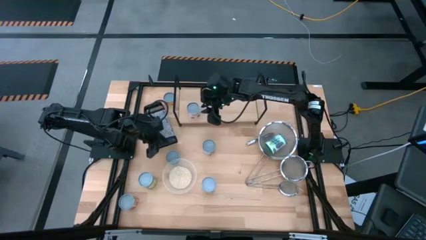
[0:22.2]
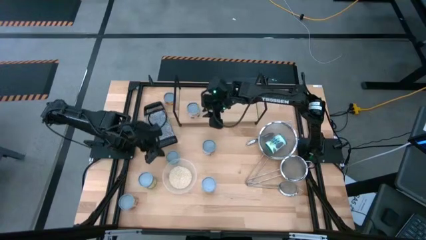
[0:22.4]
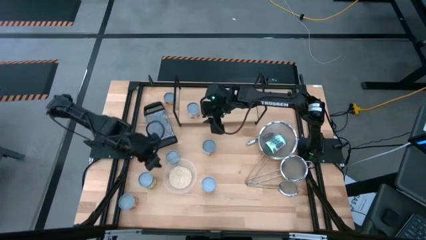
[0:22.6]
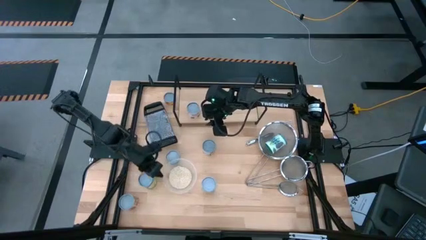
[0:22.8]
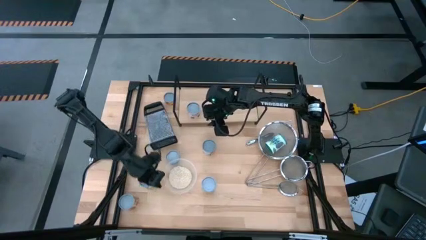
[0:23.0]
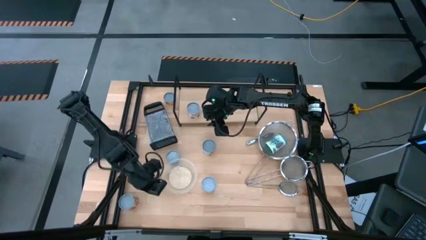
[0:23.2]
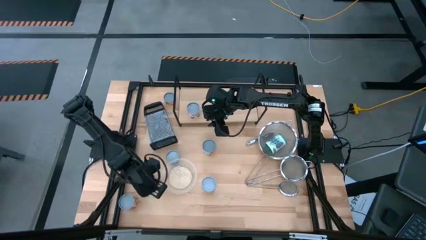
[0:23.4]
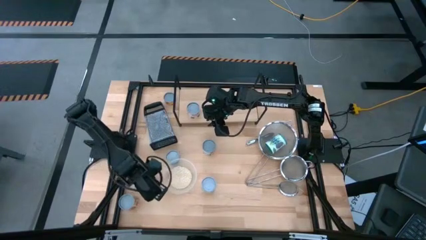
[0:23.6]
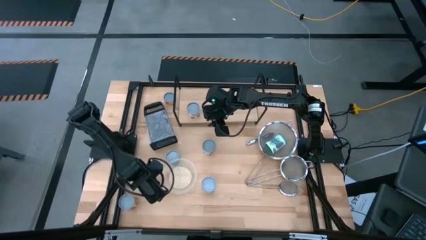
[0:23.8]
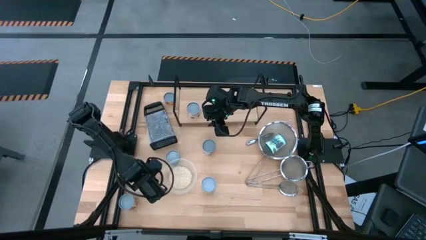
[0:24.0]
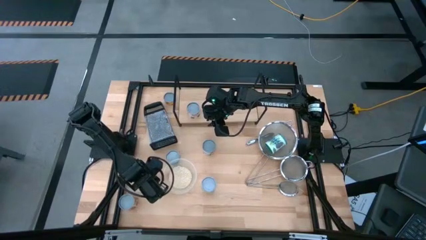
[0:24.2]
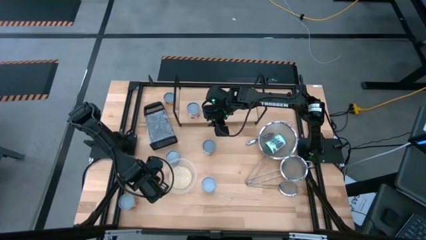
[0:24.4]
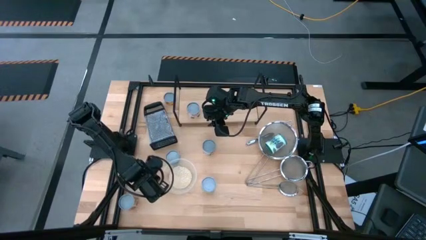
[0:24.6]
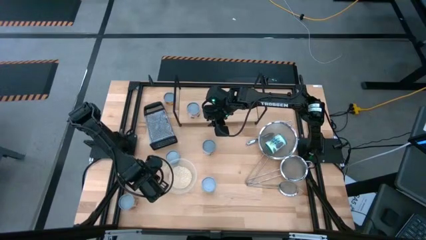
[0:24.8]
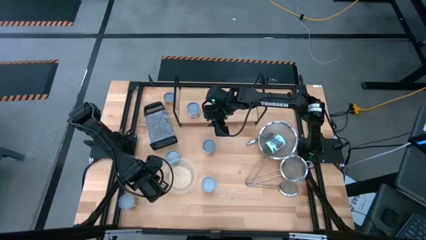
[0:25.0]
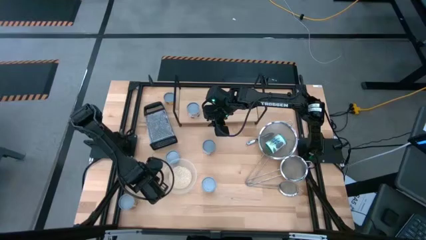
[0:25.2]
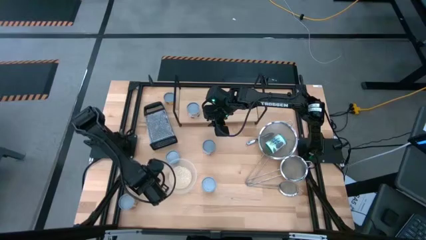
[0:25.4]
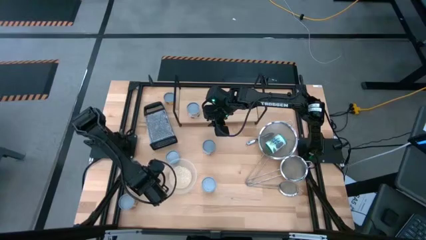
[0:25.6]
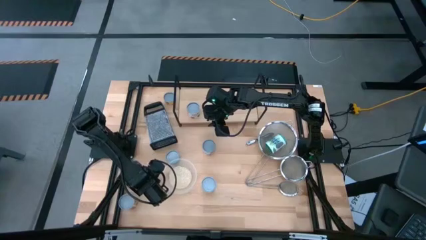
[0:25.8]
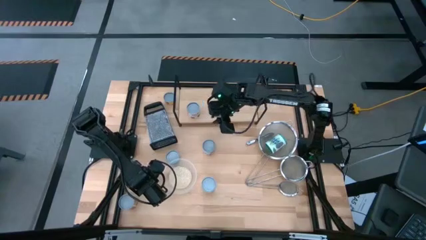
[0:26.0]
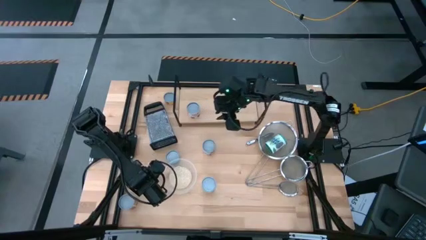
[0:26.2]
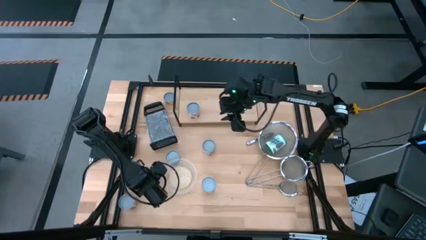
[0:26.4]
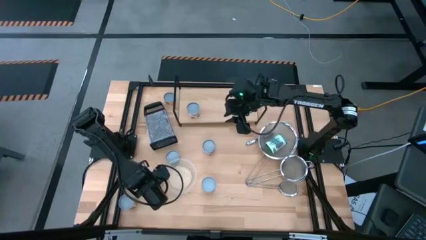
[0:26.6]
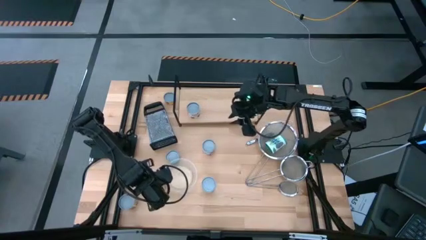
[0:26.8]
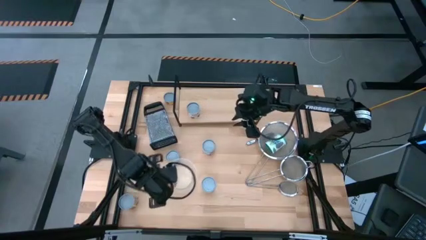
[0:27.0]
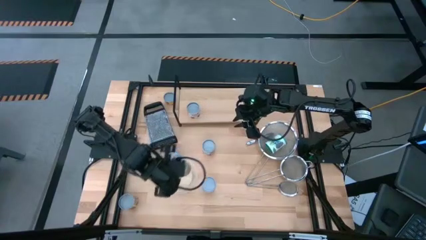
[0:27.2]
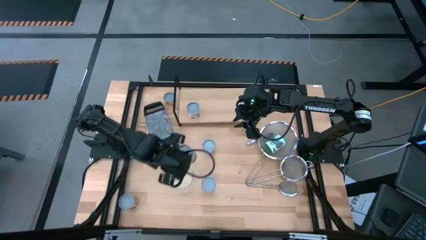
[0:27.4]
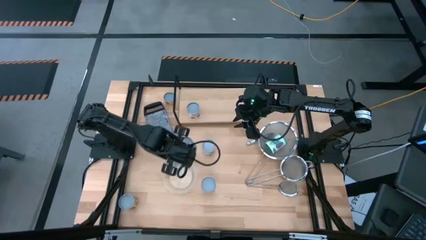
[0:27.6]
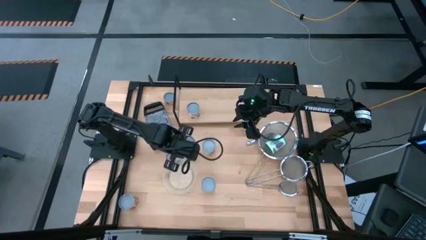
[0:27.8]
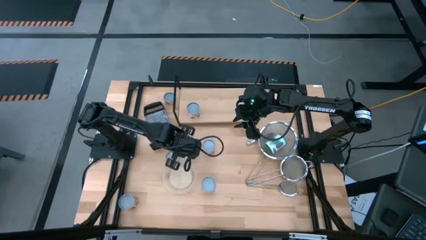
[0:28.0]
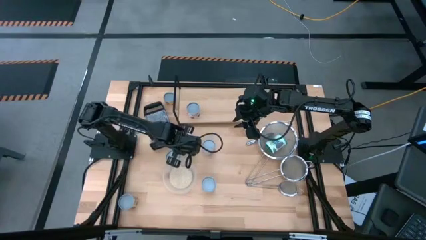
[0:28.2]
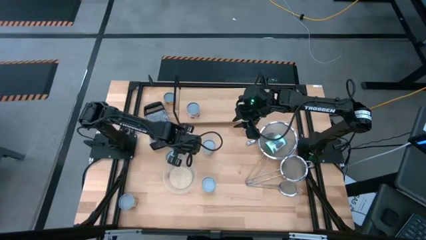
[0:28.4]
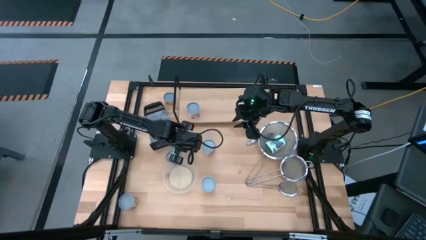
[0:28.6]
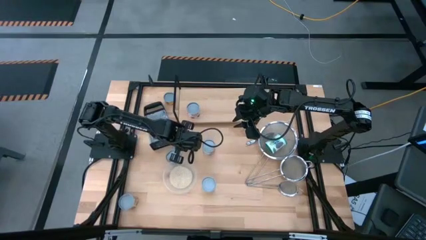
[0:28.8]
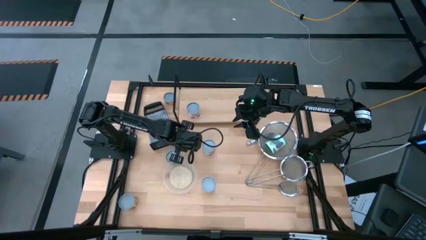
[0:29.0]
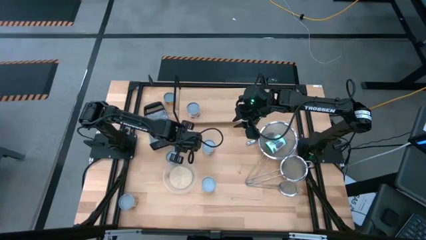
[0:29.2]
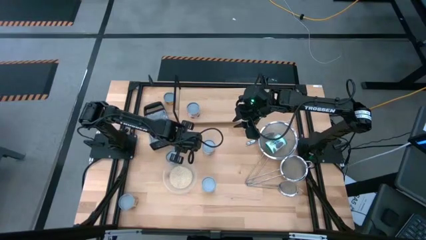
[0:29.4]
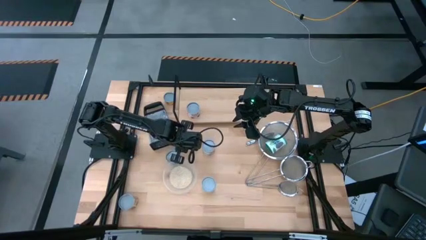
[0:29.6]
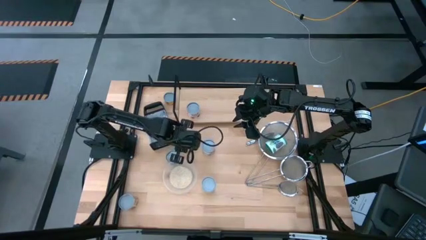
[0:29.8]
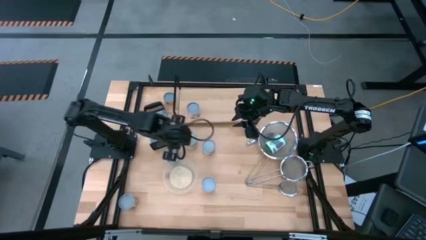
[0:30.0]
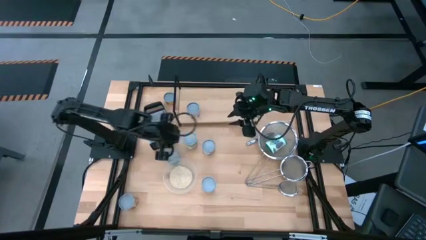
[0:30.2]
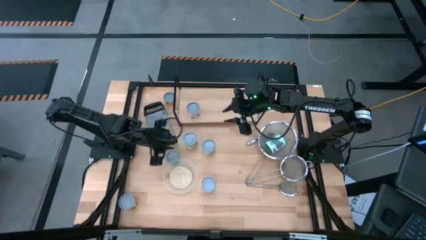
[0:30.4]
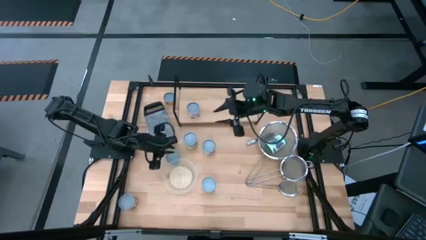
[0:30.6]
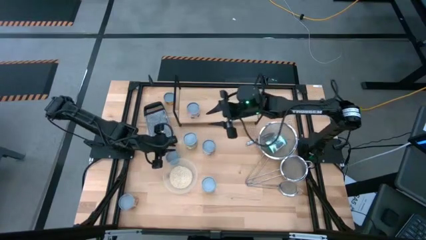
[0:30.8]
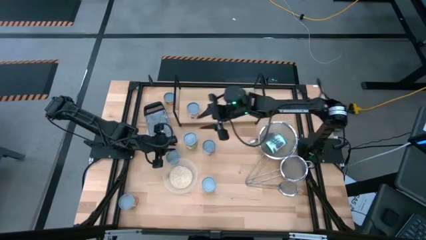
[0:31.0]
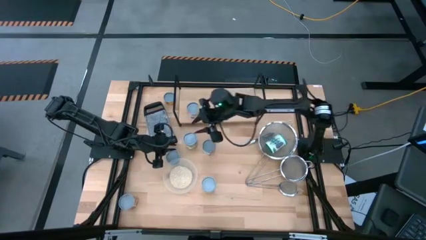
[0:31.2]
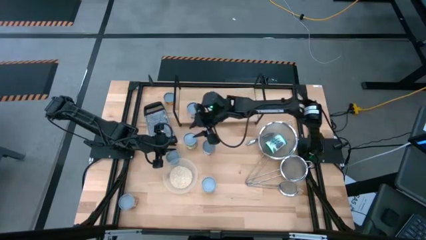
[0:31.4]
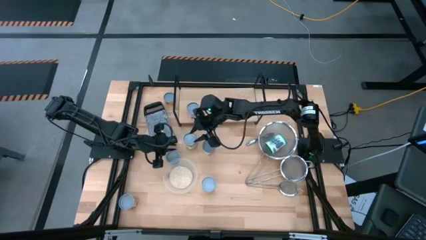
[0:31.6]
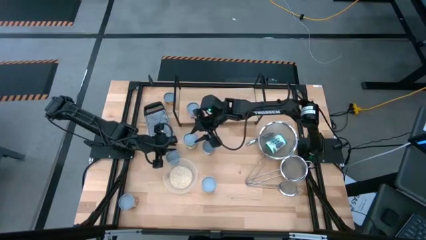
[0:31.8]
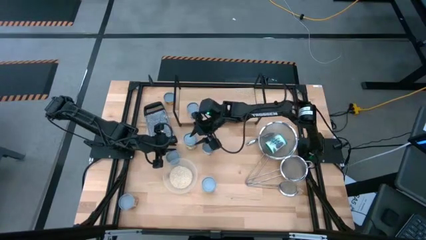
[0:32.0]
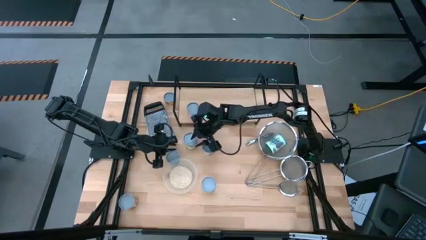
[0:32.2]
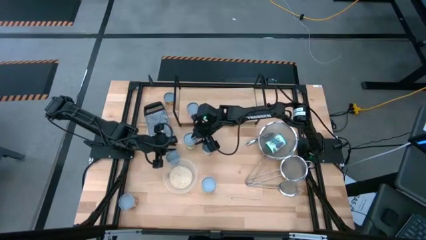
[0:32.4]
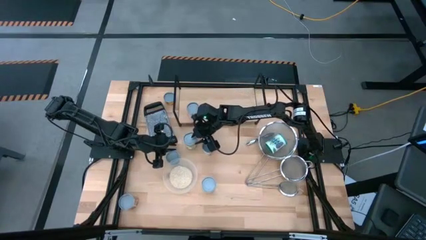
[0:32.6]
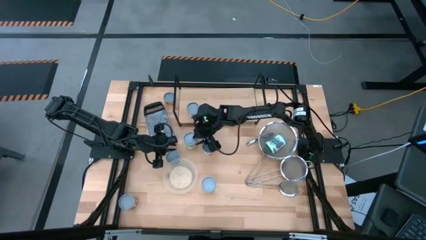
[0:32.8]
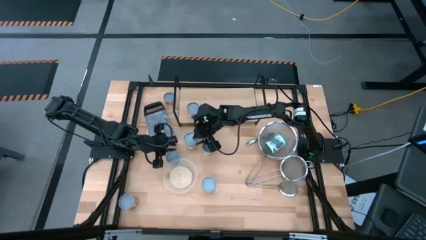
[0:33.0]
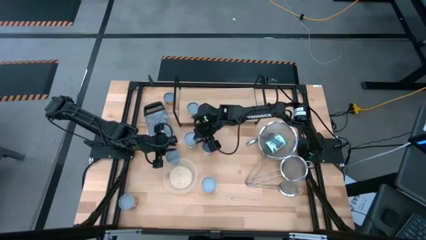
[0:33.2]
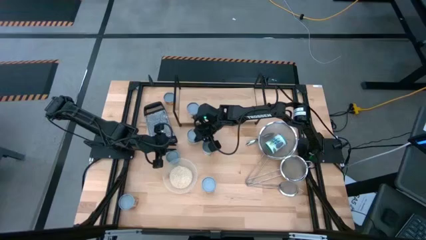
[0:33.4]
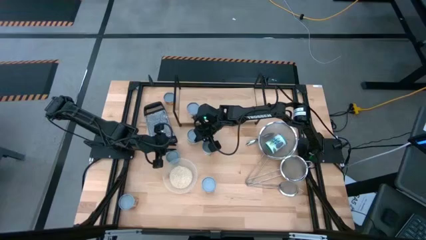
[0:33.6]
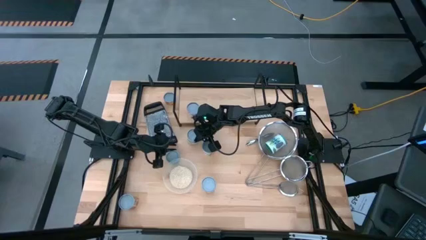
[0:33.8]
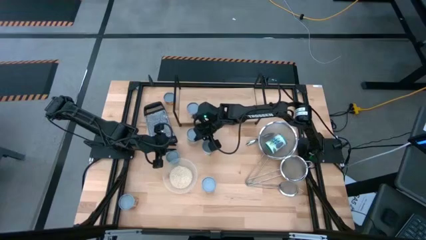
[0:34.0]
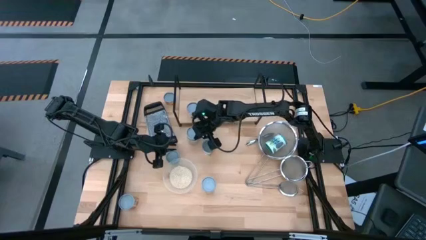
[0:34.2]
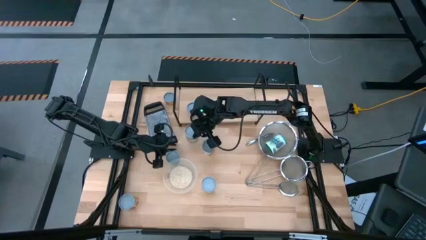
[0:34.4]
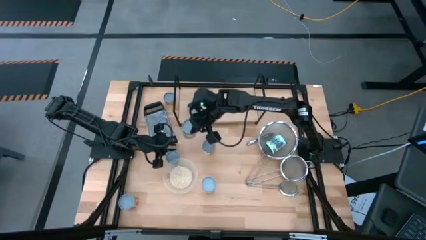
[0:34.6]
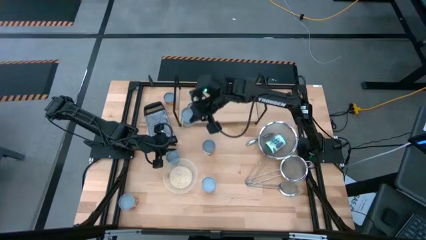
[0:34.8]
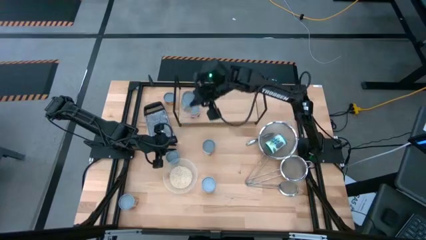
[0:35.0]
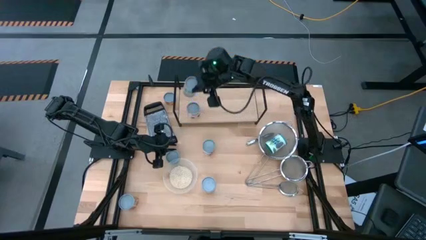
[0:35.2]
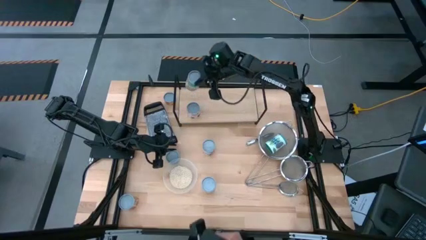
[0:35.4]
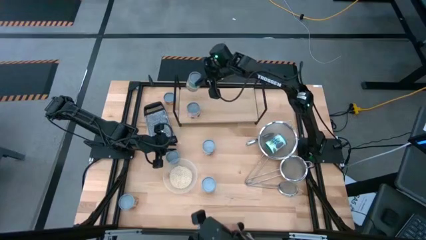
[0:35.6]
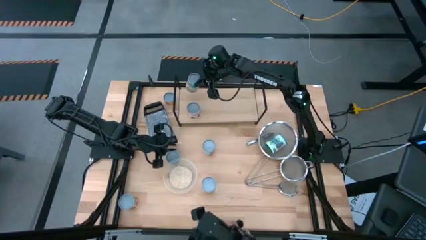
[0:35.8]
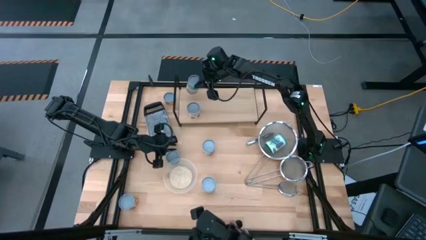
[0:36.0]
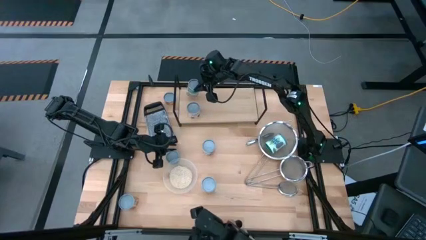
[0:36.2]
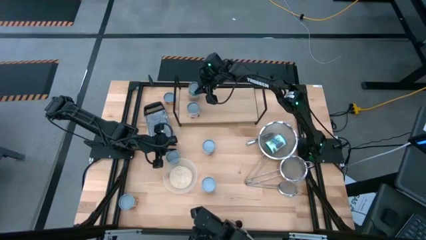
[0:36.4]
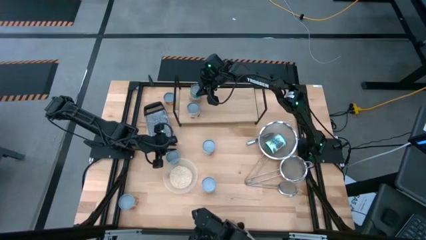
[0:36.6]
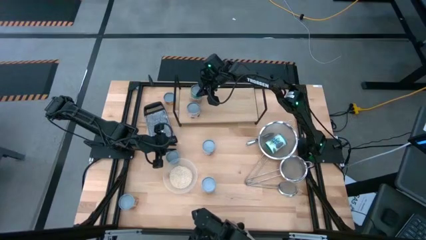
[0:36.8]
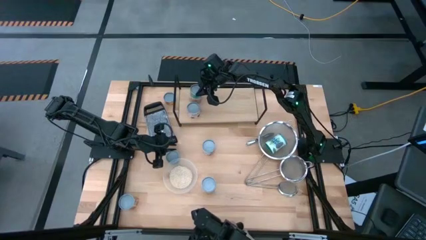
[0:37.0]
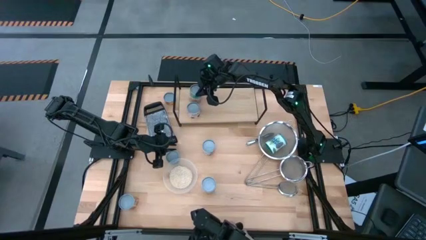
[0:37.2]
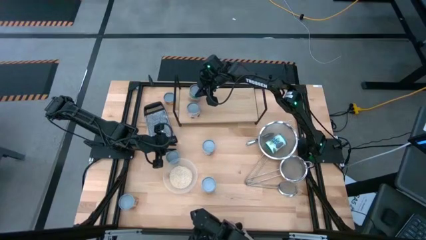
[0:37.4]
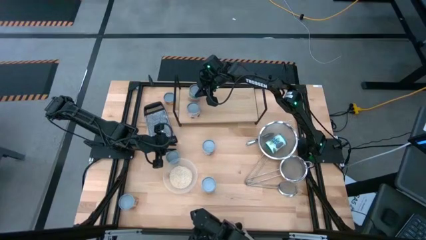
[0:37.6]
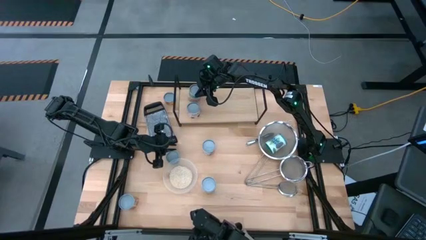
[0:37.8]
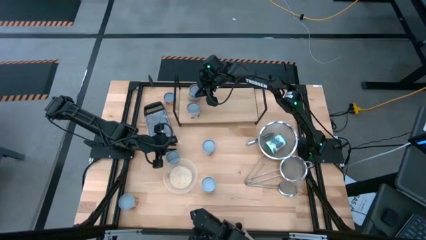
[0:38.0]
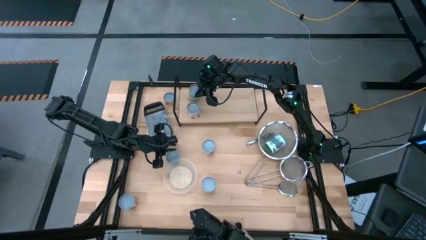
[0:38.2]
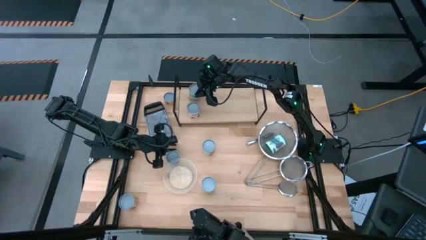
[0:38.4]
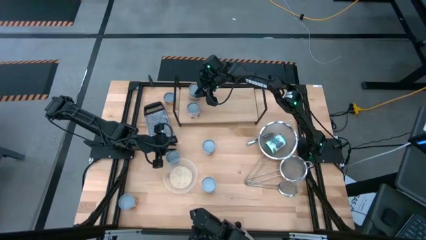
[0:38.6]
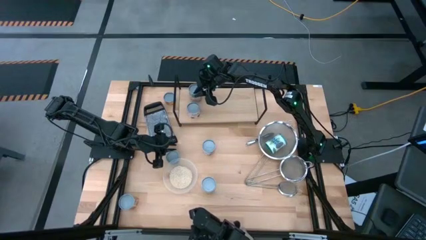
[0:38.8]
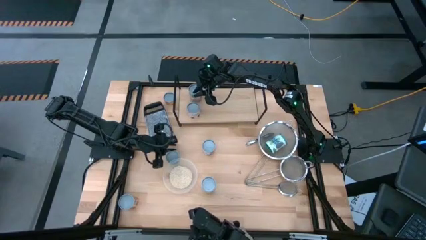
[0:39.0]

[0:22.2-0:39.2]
Task: Pick and place cans onto a shelf
Put the green chicken soup can on the shelf
